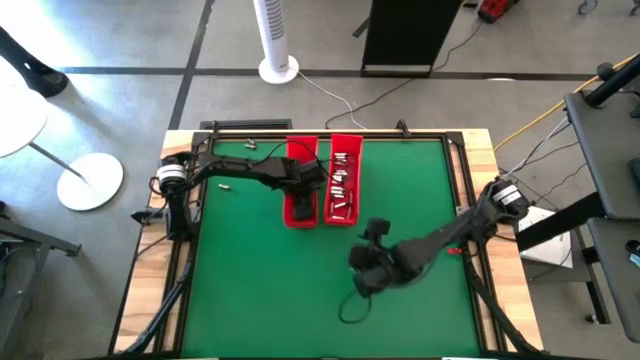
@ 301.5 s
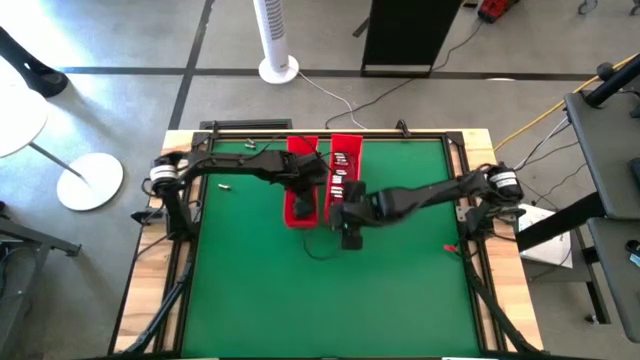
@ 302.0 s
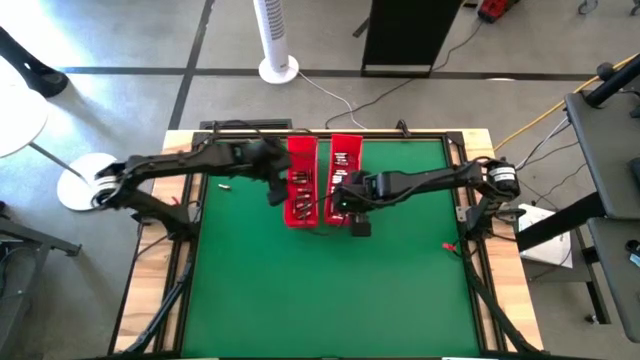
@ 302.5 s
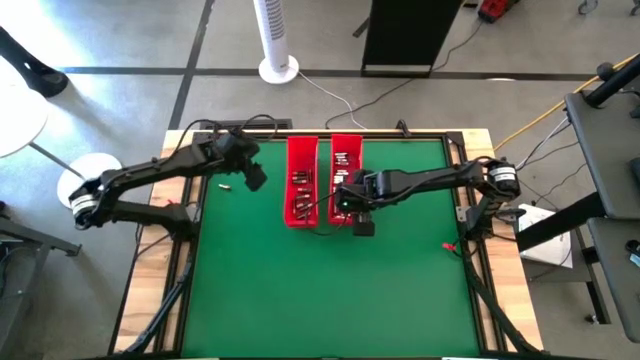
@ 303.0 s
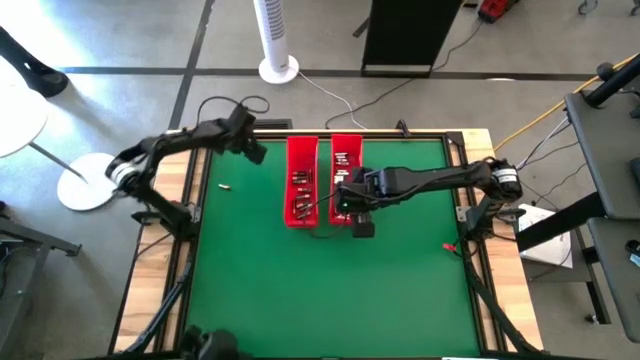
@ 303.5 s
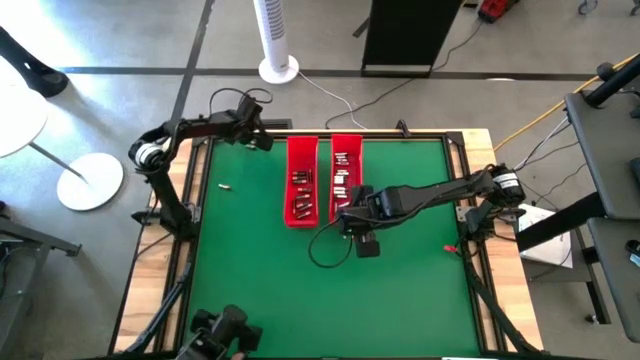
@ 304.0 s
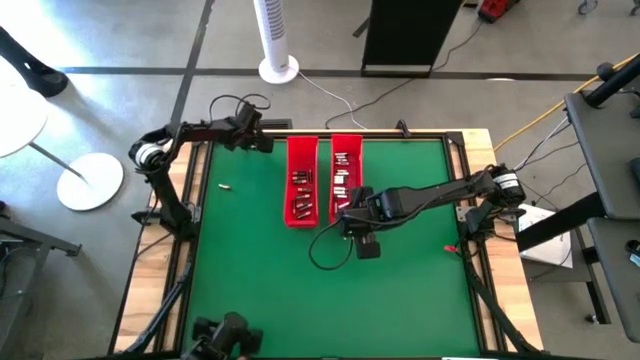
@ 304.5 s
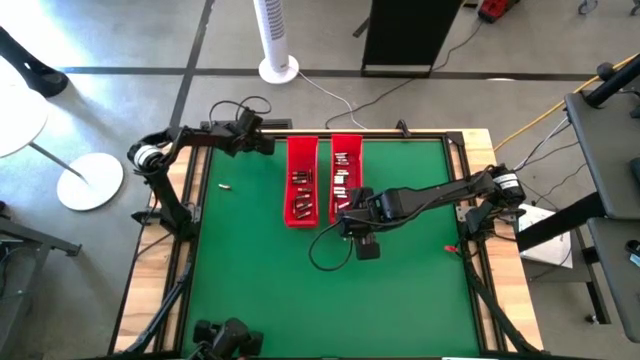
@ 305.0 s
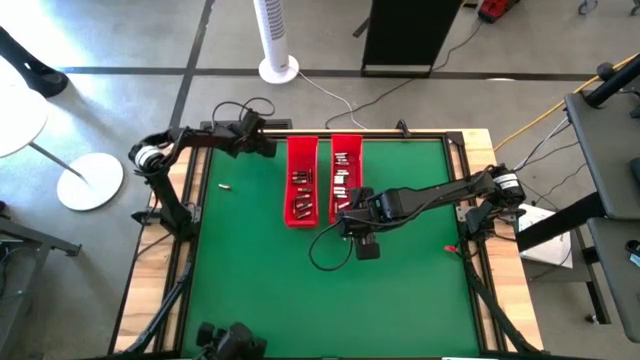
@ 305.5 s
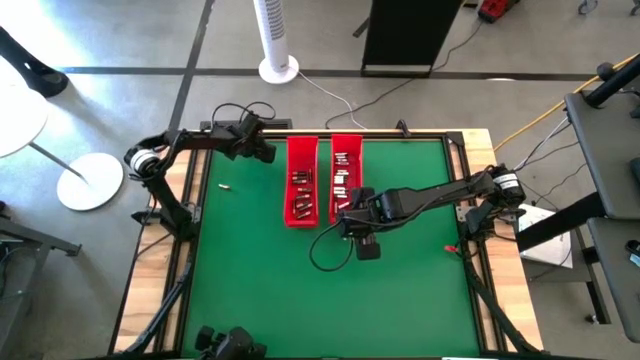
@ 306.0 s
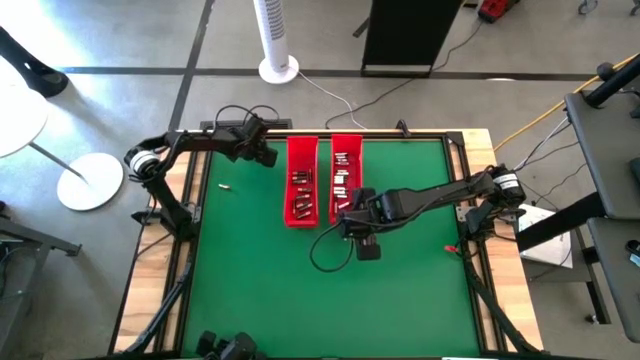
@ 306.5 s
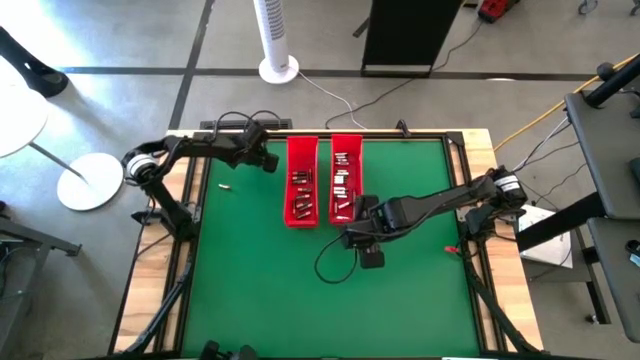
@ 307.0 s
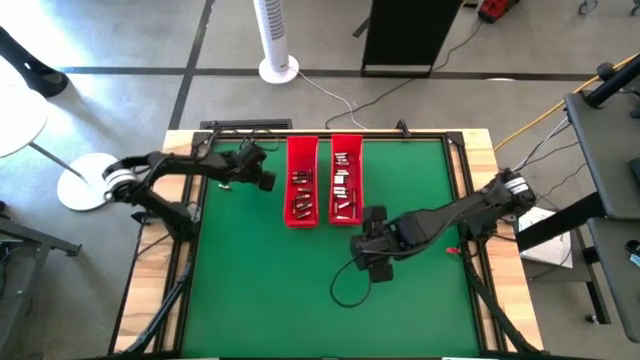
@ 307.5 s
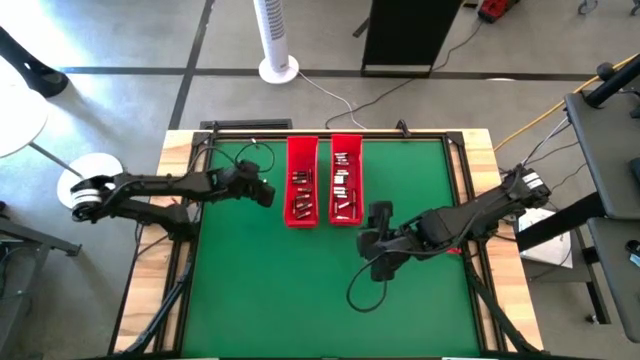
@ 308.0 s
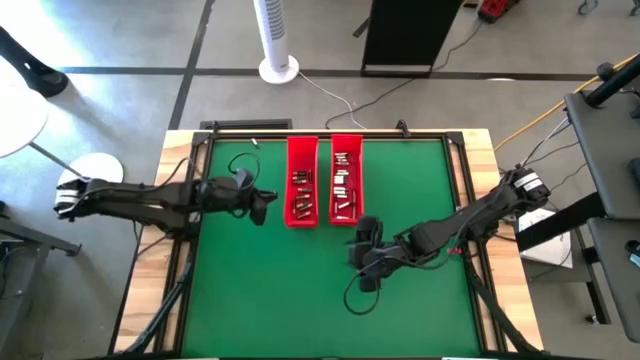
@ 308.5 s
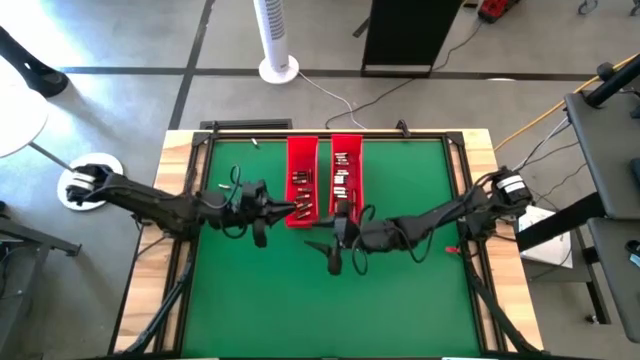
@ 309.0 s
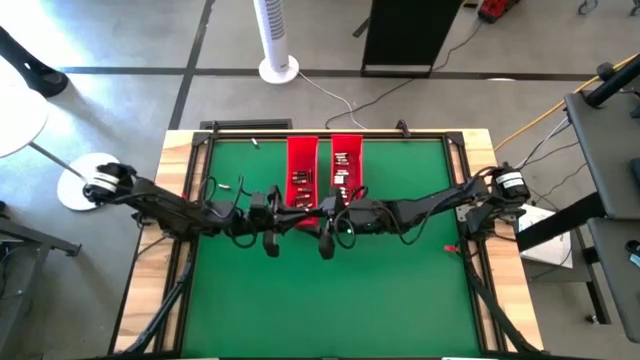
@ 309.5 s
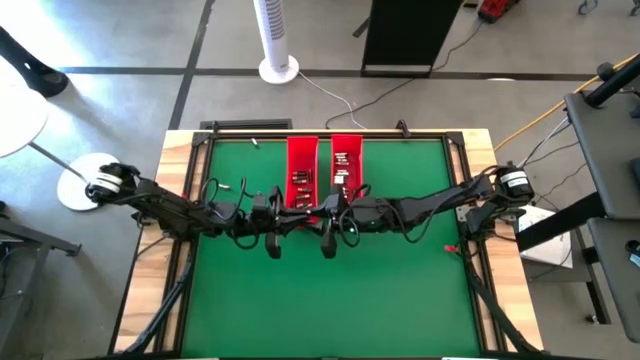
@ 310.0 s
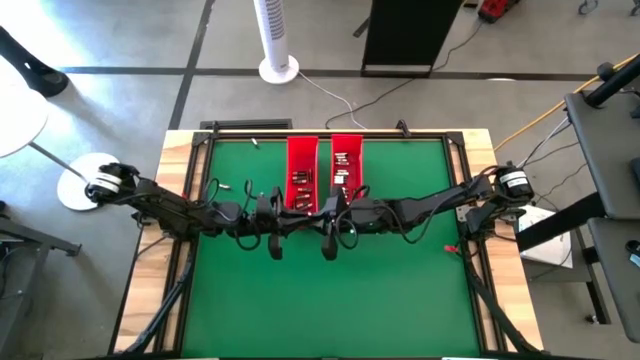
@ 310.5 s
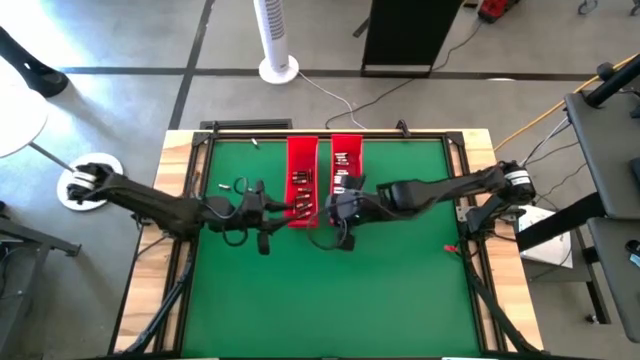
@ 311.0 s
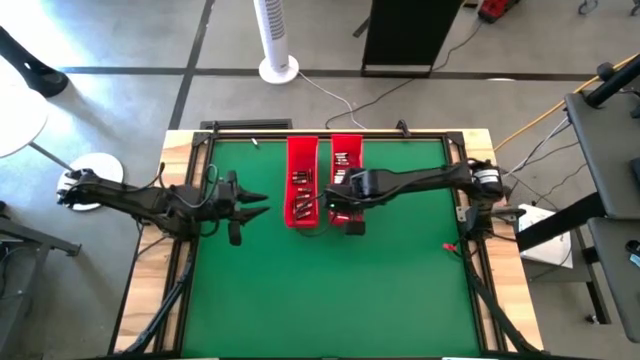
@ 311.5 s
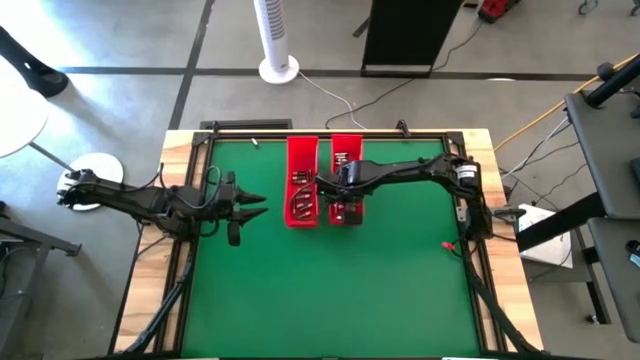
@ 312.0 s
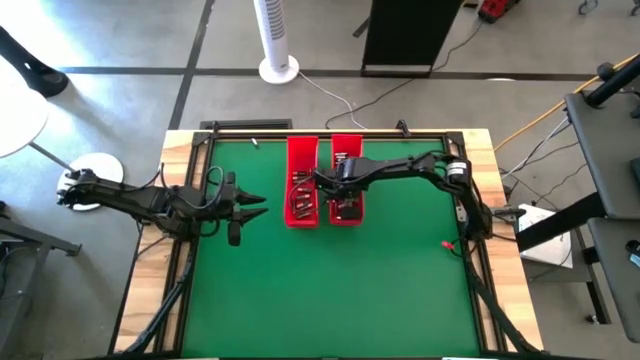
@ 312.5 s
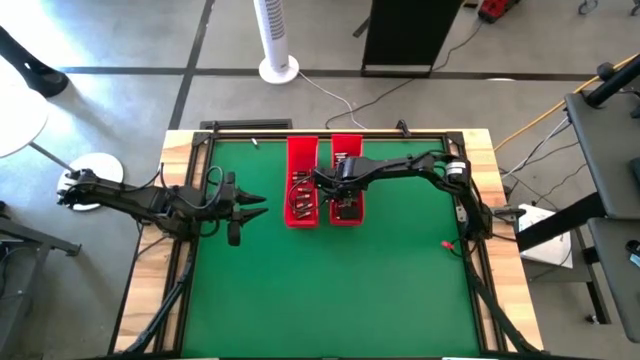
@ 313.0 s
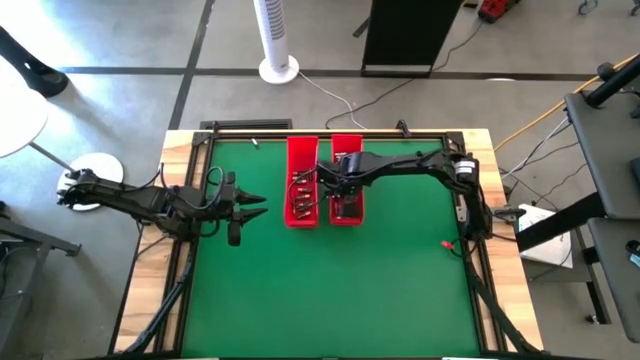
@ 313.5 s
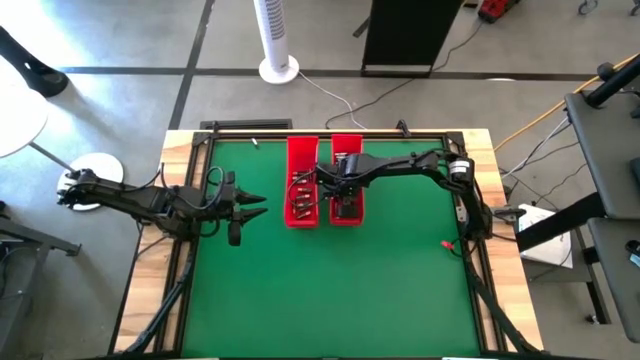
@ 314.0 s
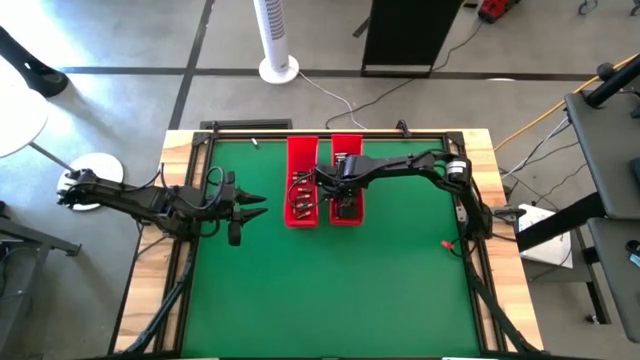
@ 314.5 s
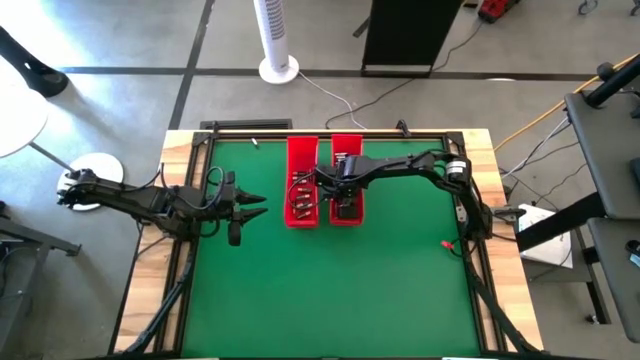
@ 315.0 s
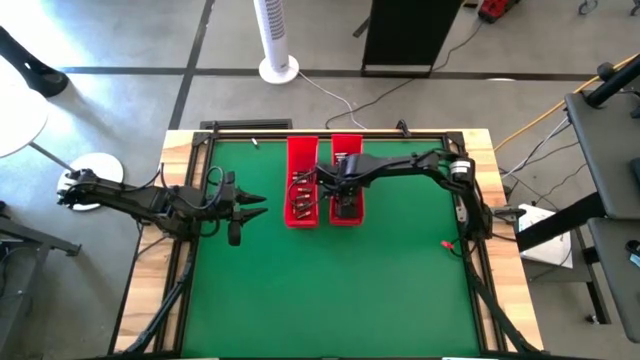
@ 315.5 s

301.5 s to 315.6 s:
Task: Sort batteries
Put the silver battery into the right red bin

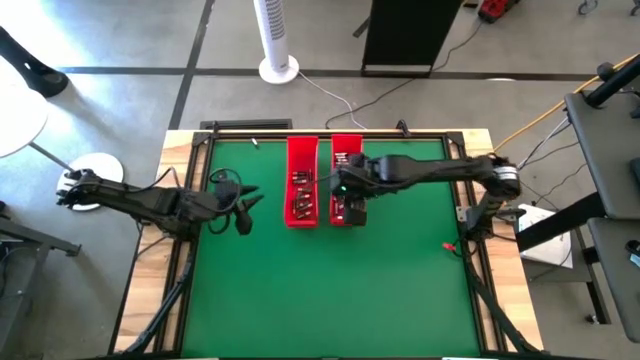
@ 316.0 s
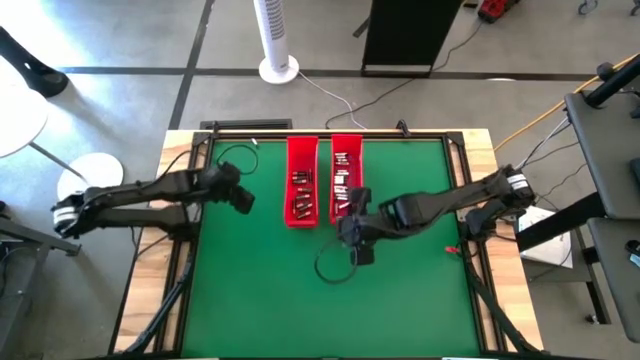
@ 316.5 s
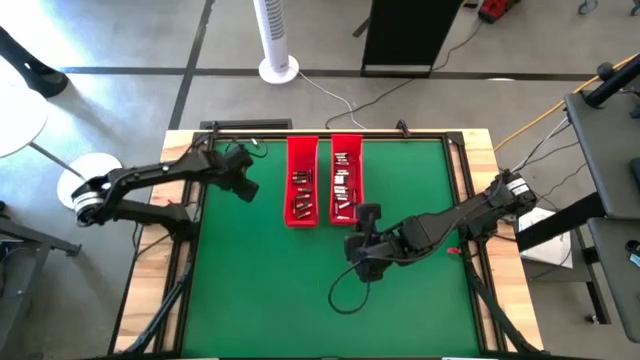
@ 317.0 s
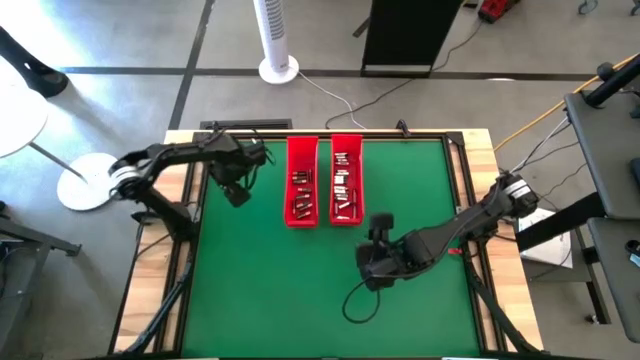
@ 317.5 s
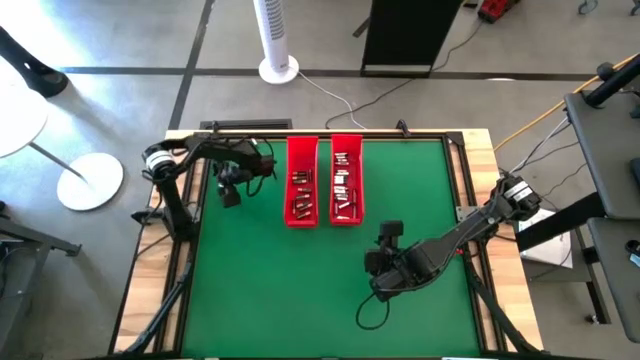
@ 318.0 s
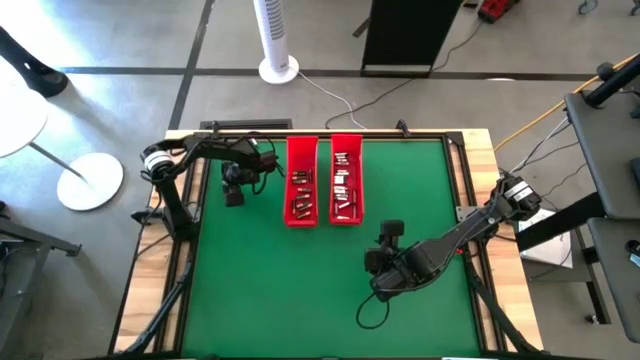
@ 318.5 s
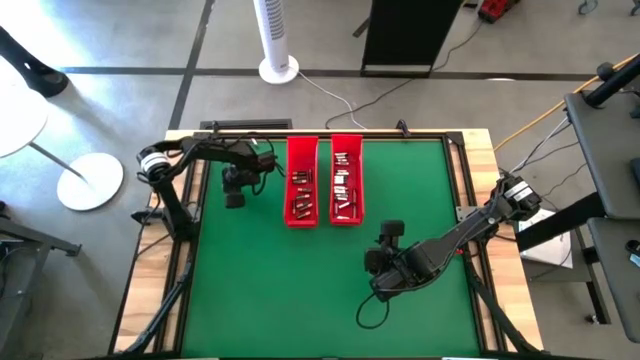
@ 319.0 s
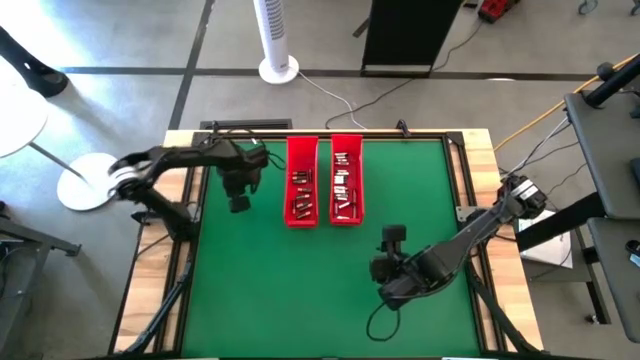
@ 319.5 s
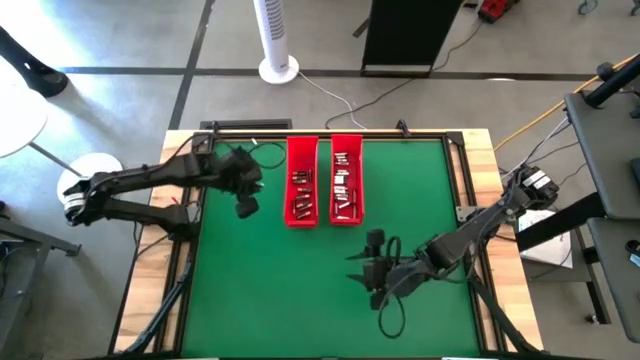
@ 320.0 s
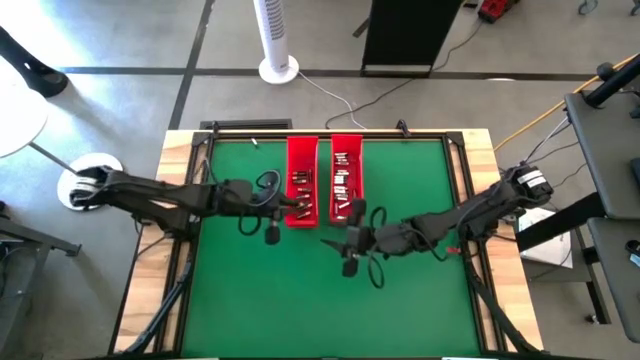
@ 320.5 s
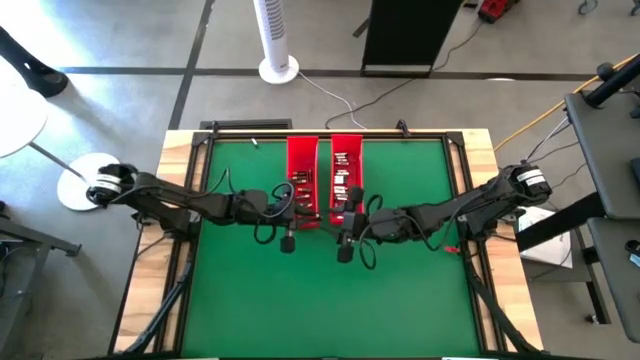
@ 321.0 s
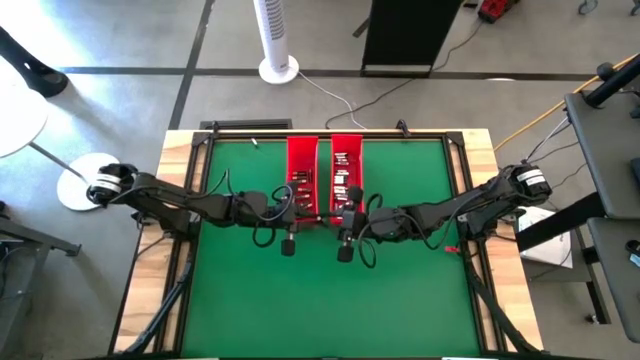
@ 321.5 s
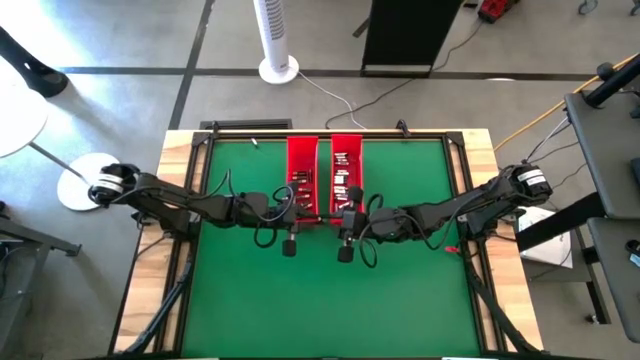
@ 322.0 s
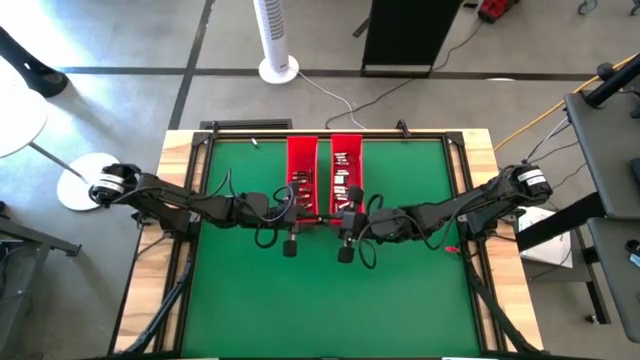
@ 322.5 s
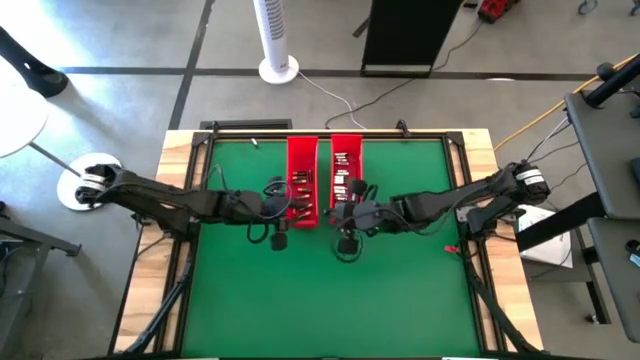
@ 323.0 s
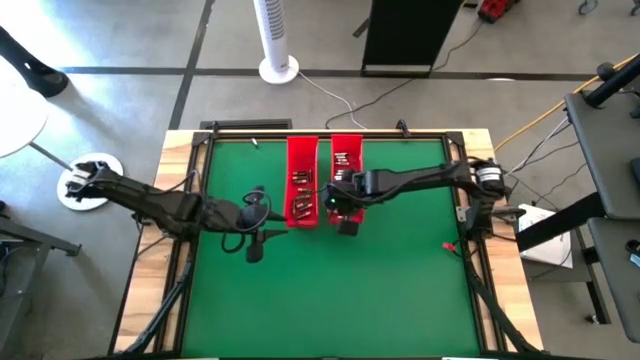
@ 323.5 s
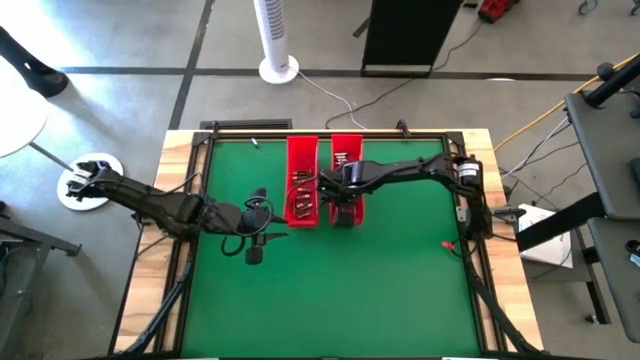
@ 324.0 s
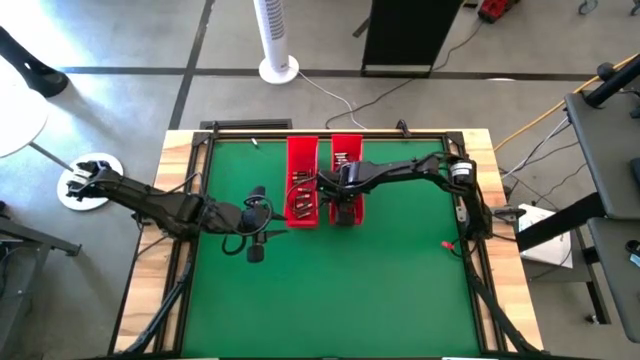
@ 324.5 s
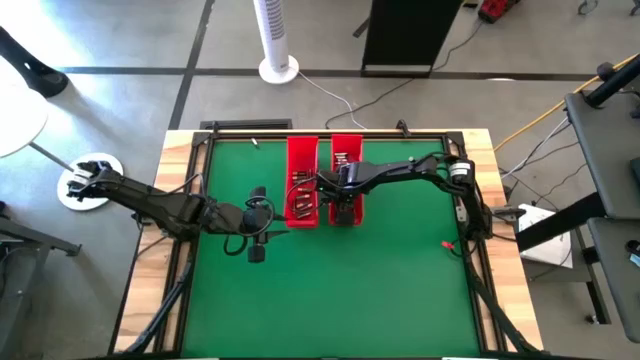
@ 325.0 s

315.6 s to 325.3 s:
Put the silver battery into the right red bin
